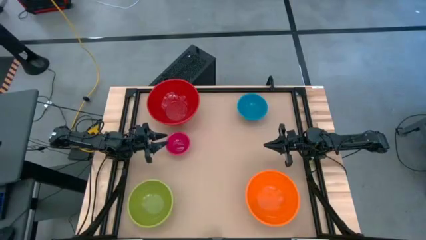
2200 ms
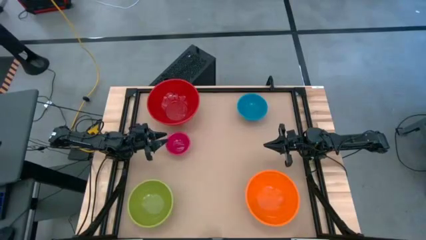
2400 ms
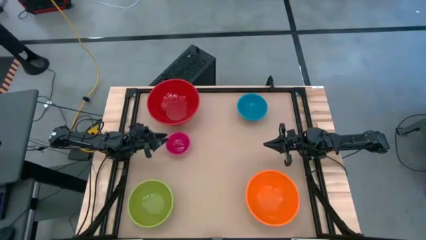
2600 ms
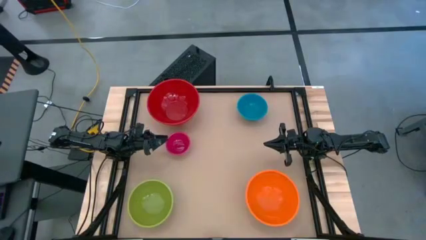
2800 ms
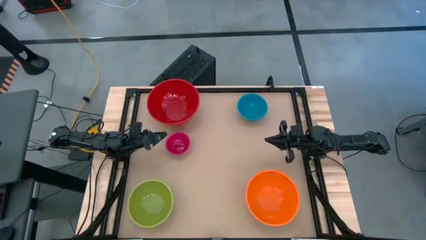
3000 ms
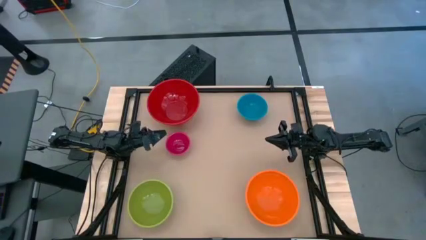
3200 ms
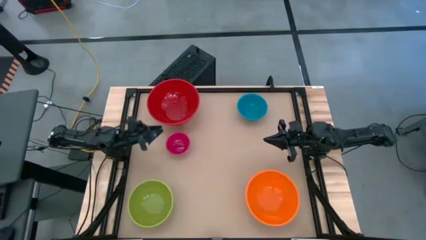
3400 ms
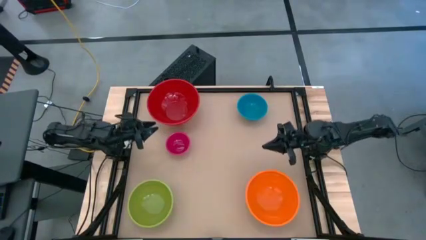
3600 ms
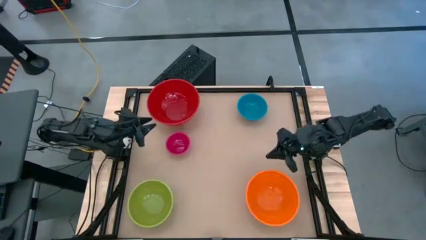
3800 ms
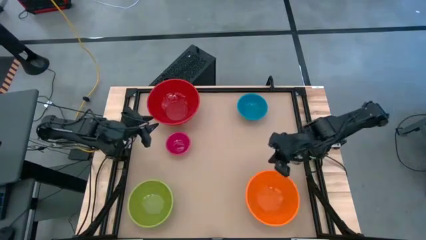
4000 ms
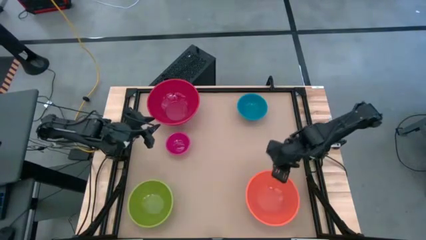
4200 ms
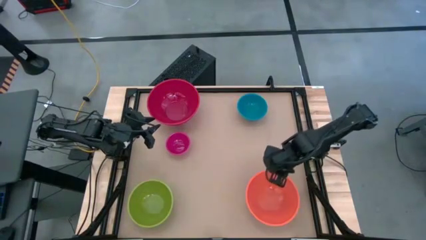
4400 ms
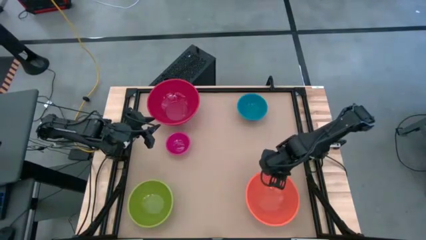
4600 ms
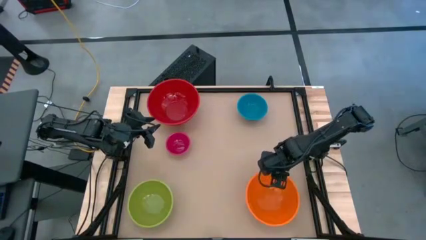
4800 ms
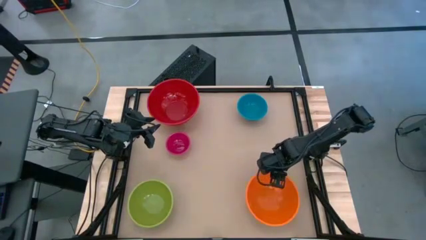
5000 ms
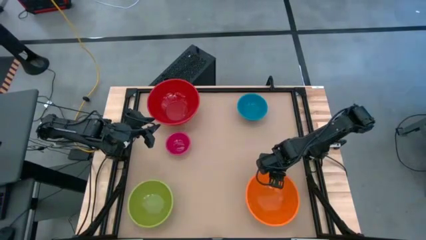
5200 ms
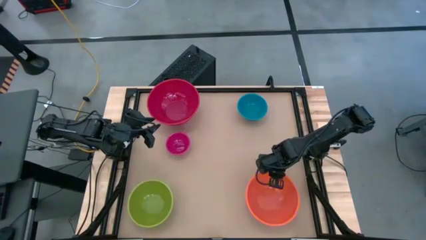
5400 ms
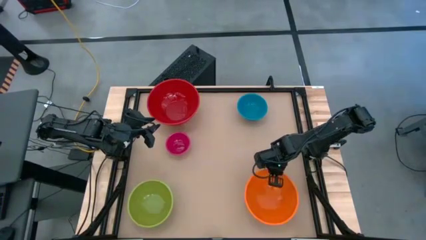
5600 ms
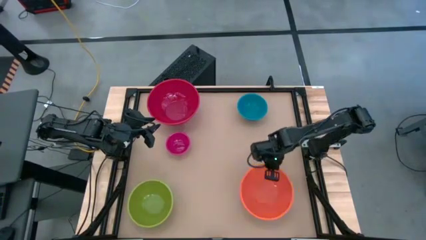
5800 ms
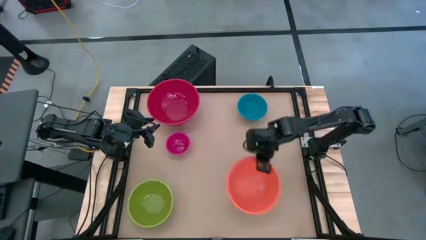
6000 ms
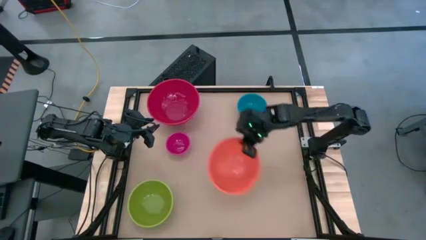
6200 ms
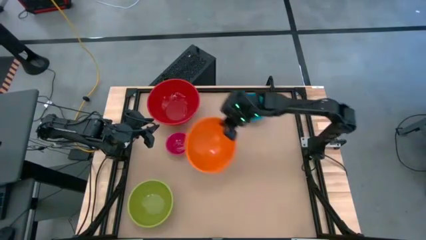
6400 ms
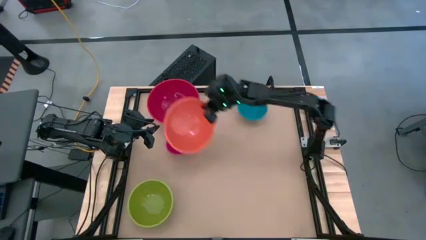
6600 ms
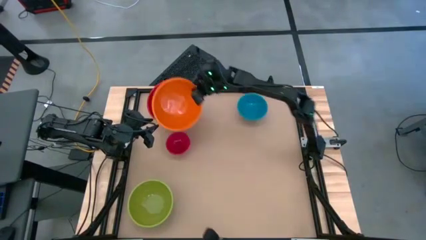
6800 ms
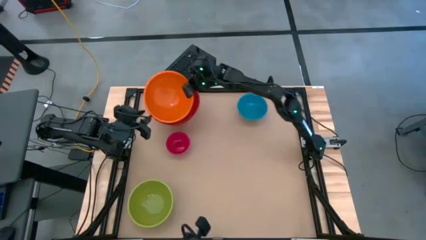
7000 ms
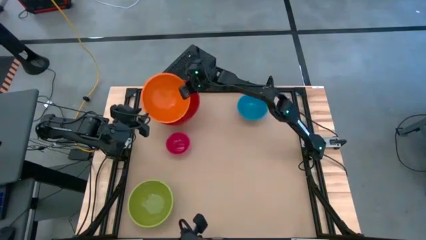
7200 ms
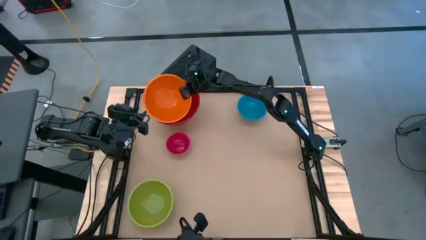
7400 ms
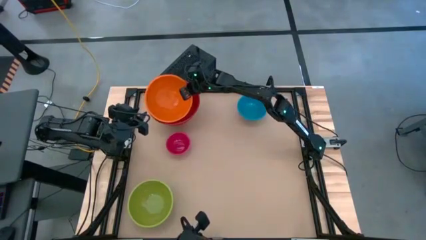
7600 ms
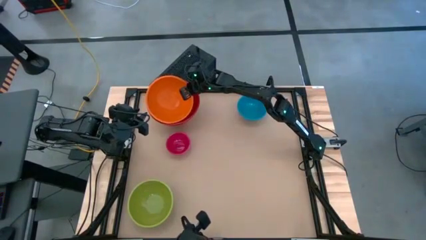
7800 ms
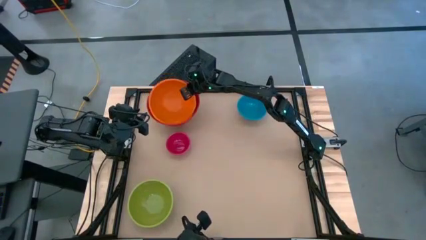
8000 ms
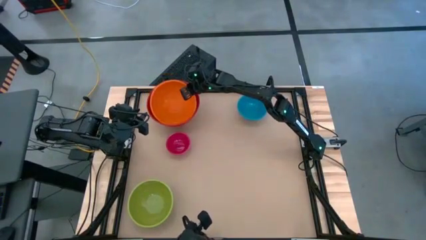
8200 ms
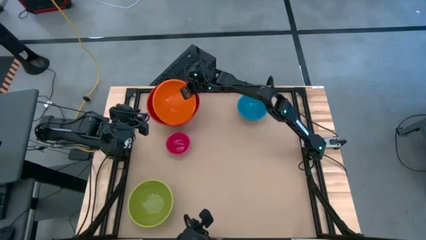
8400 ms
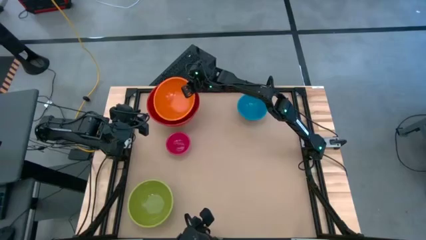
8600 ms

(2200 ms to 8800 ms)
Stack the orange bowl on top of the red bowl

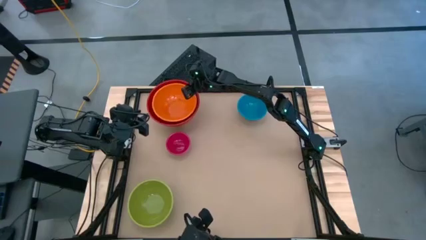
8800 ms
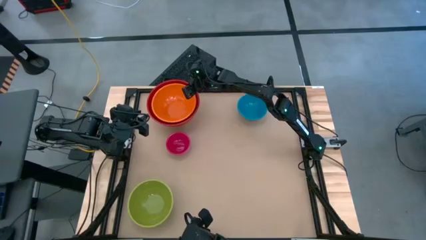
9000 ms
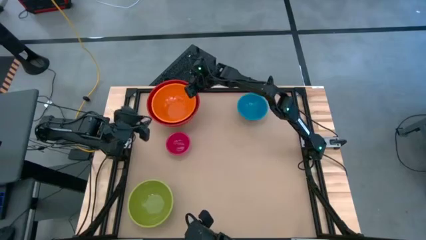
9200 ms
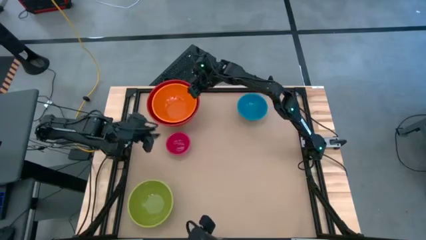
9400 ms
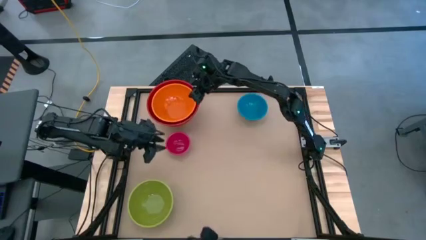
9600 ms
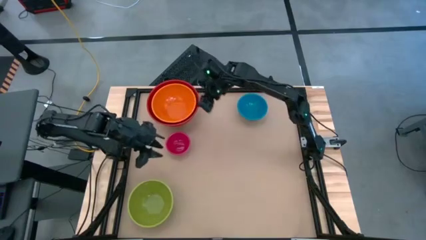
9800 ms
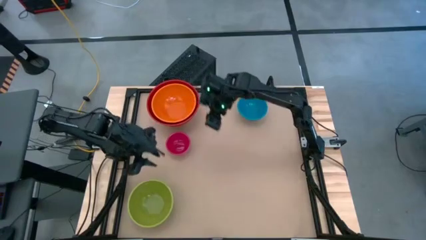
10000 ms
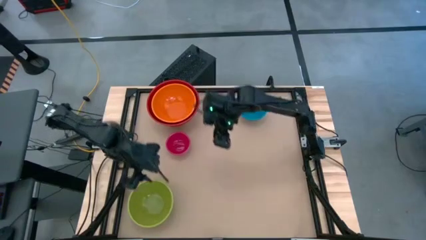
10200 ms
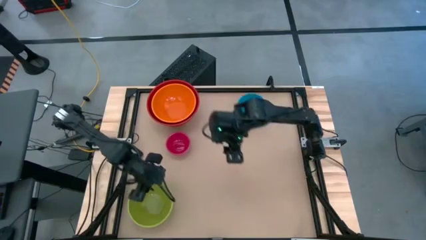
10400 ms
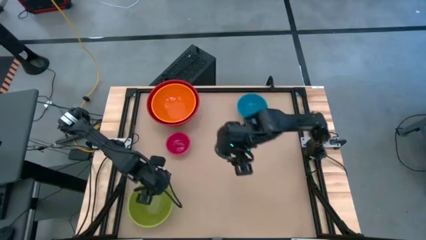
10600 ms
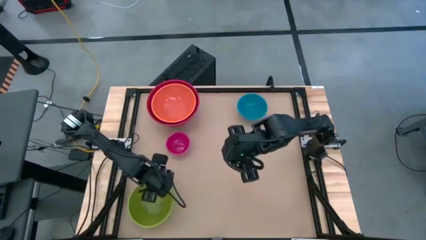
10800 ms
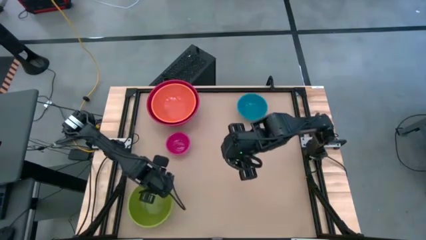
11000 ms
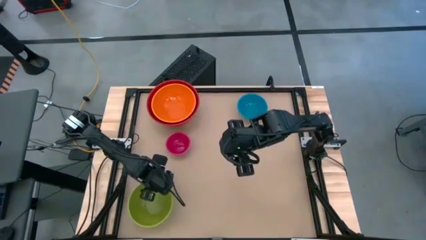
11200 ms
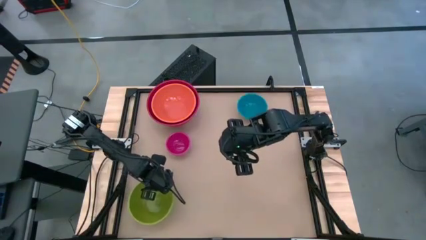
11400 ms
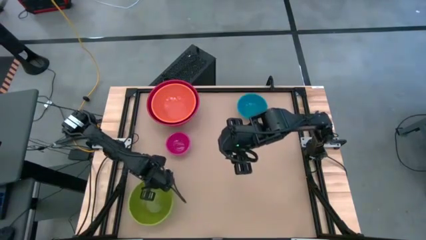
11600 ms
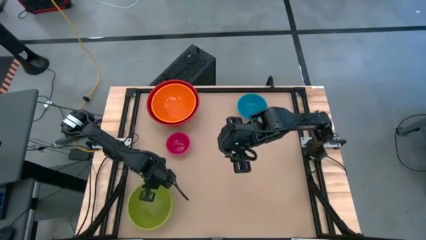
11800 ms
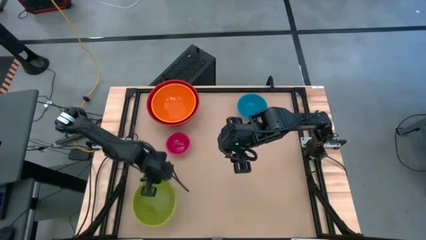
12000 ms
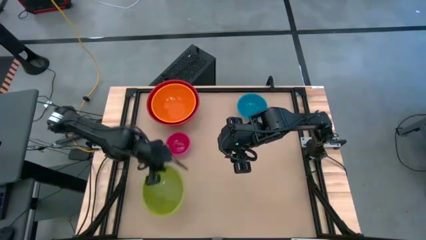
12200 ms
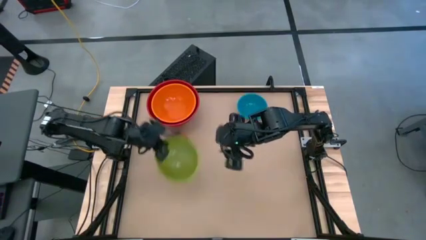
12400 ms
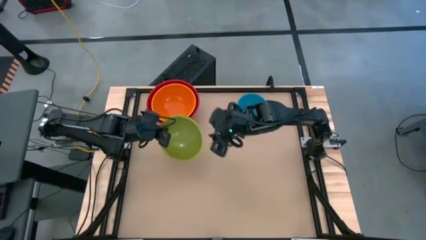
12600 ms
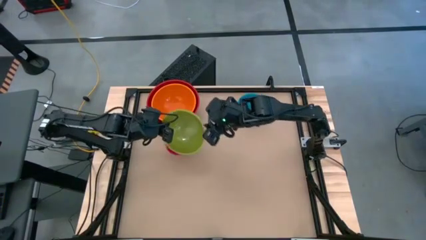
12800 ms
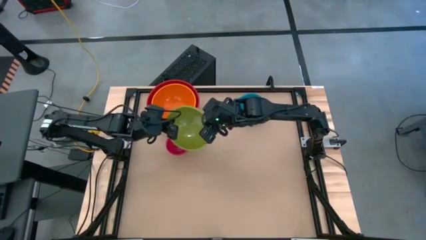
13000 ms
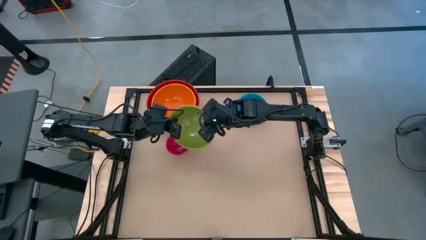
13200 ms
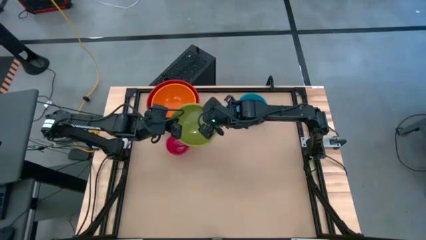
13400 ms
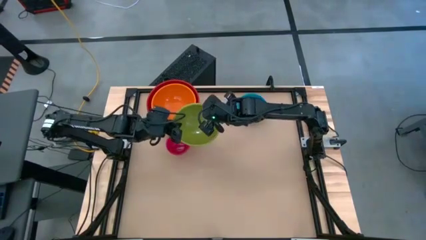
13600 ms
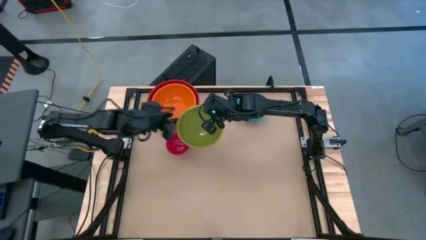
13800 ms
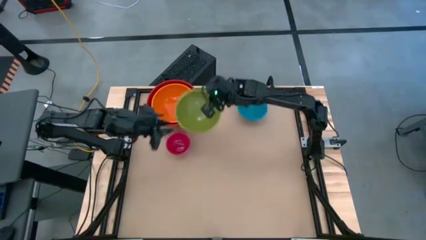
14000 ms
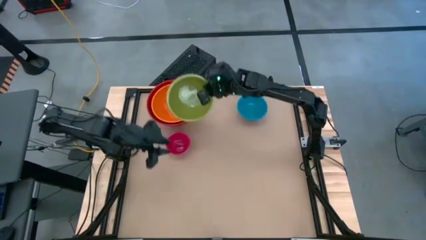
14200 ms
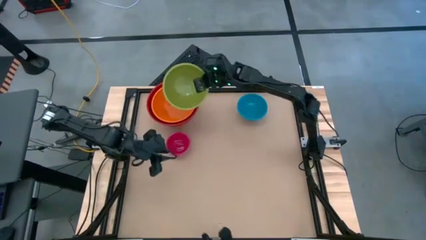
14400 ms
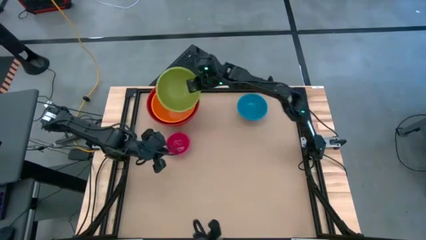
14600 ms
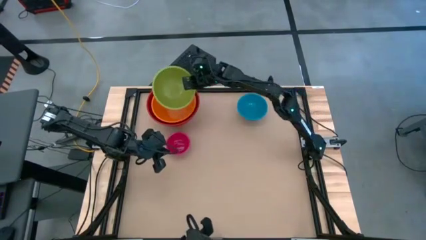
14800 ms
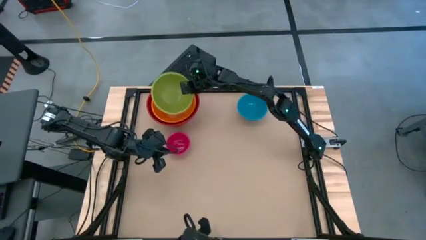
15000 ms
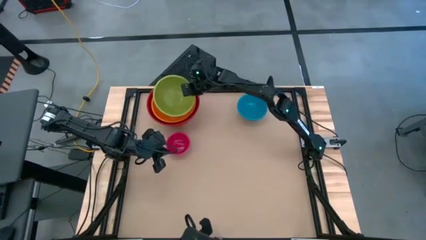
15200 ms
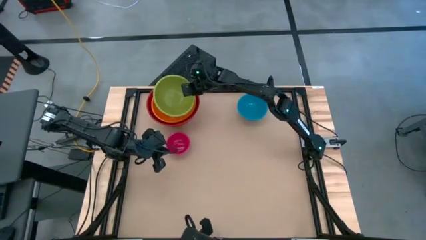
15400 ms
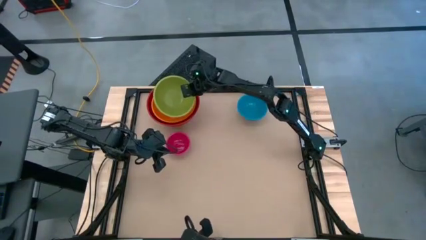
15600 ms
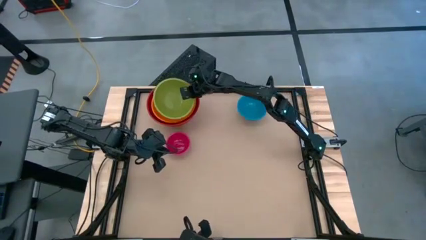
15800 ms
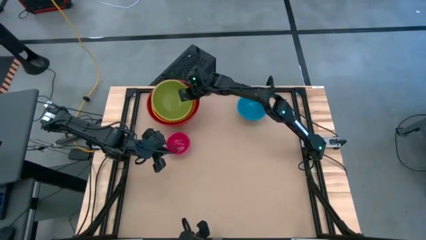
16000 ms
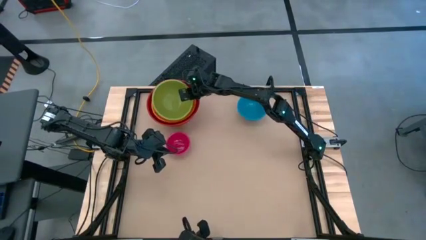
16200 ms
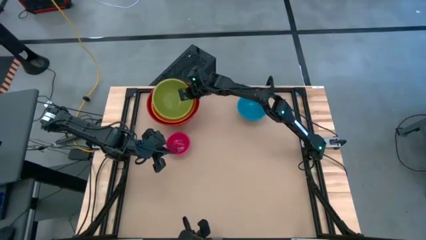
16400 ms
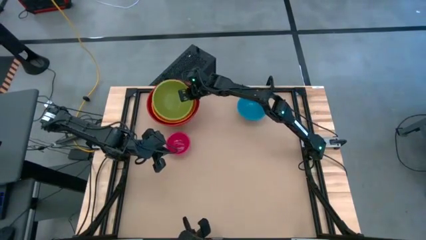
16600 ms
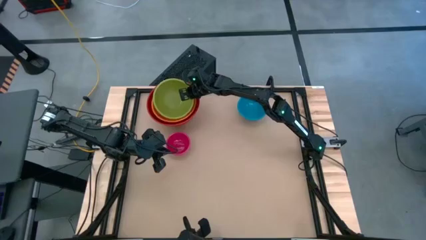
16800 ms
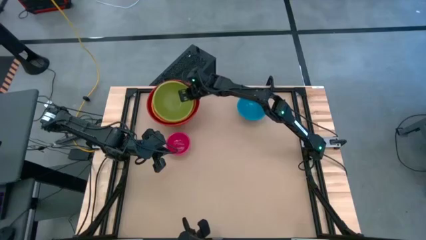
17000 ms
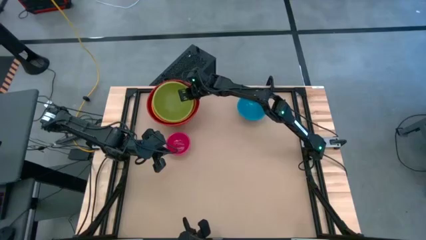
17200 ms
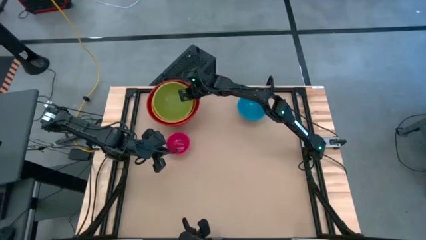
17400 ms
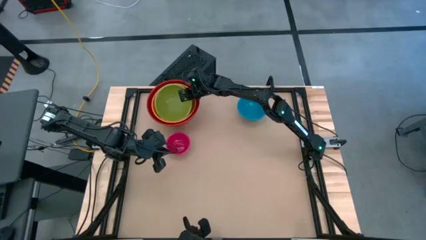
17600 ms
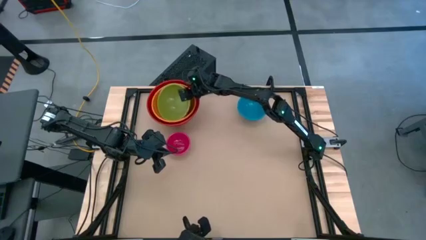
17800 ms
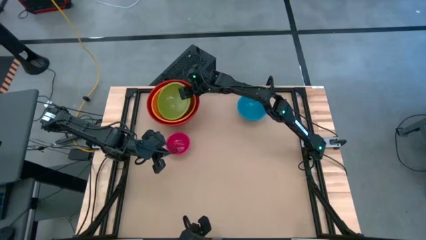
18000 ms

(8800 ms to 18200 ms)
Stack the green bowl on top of the orange bowl
